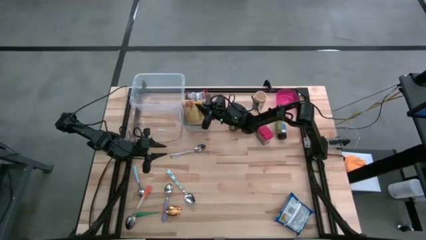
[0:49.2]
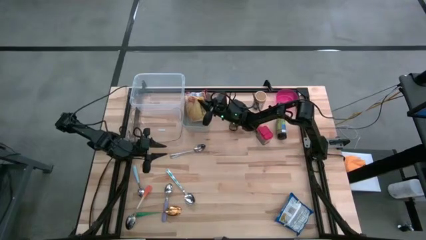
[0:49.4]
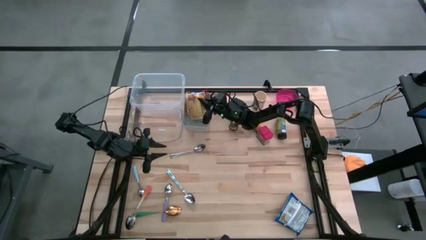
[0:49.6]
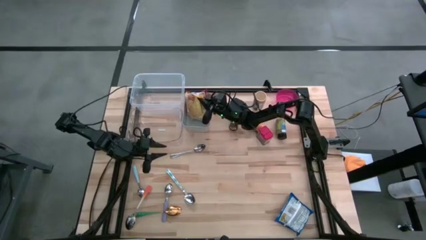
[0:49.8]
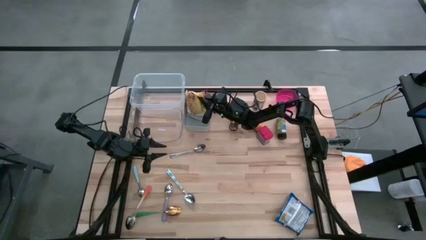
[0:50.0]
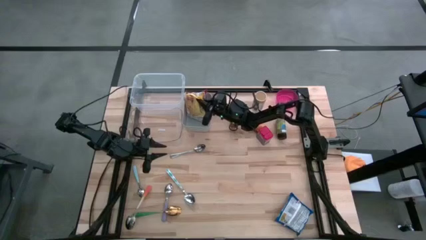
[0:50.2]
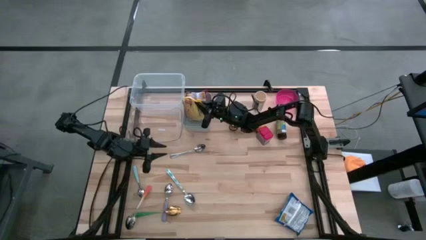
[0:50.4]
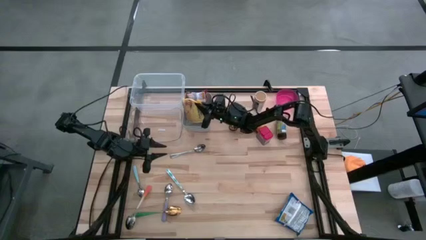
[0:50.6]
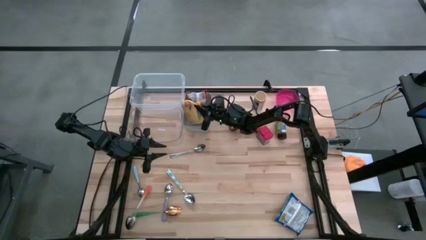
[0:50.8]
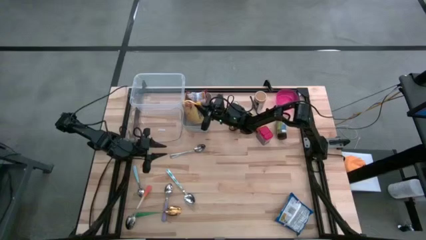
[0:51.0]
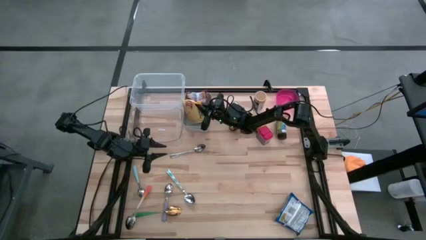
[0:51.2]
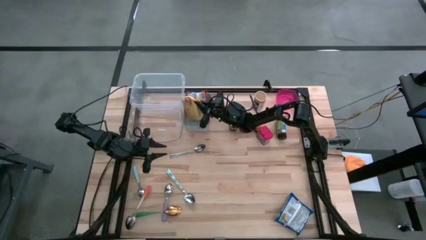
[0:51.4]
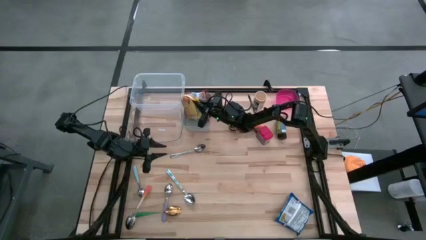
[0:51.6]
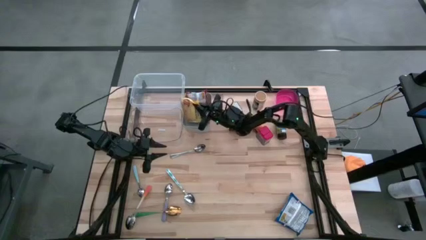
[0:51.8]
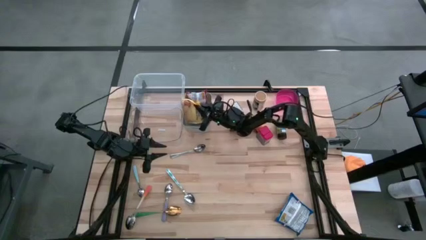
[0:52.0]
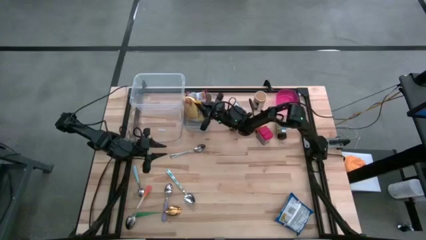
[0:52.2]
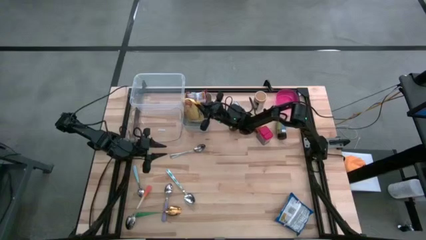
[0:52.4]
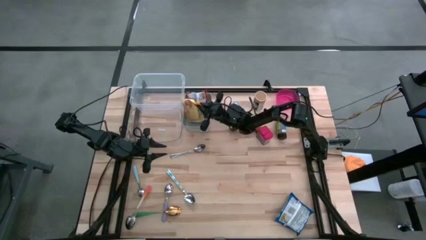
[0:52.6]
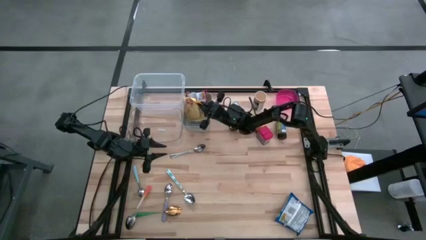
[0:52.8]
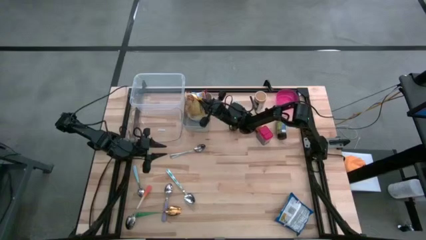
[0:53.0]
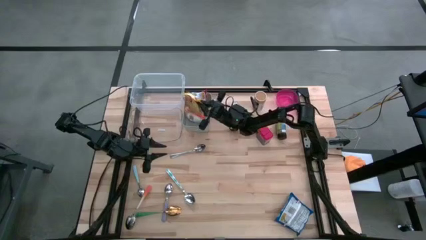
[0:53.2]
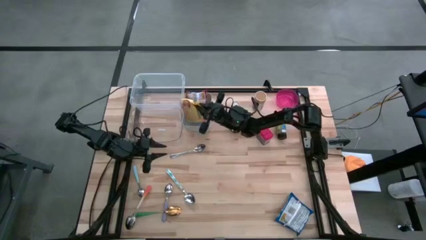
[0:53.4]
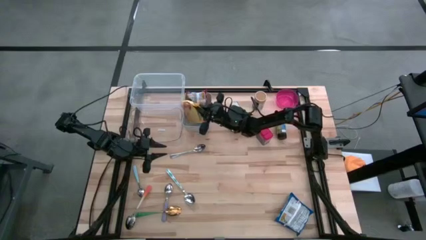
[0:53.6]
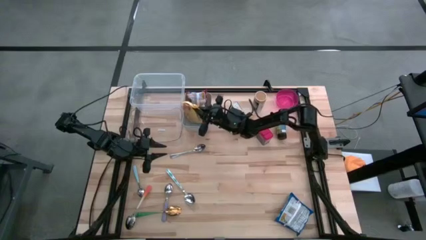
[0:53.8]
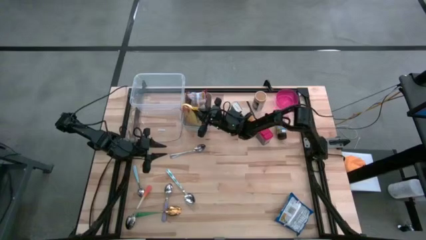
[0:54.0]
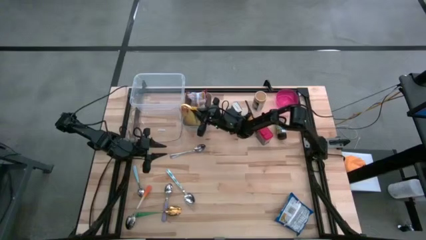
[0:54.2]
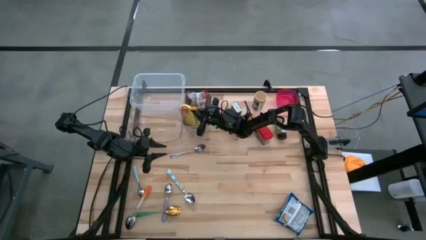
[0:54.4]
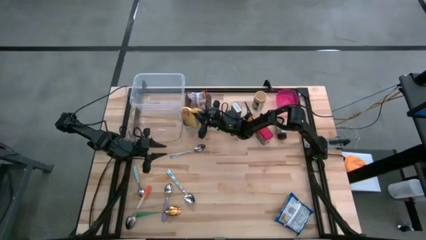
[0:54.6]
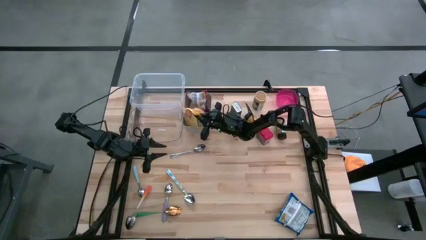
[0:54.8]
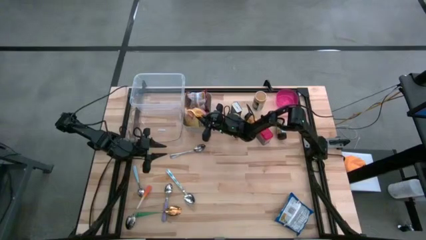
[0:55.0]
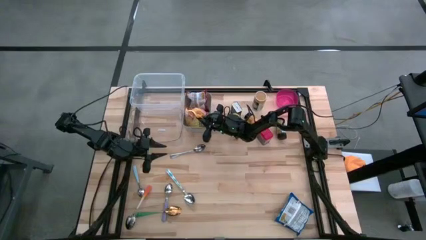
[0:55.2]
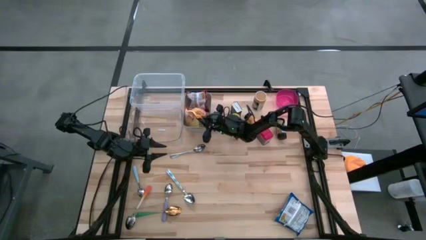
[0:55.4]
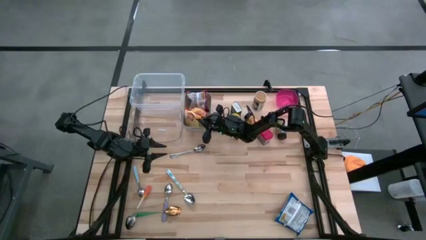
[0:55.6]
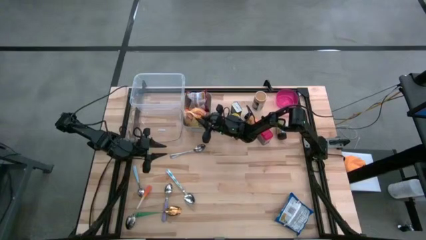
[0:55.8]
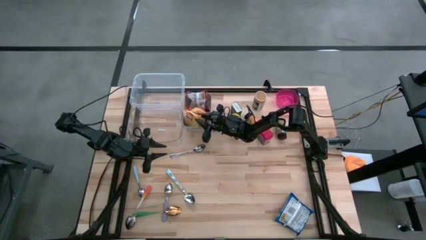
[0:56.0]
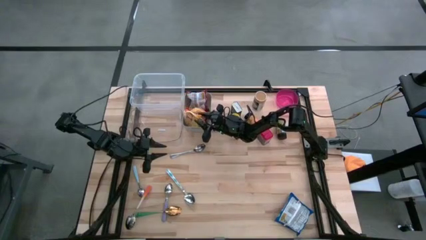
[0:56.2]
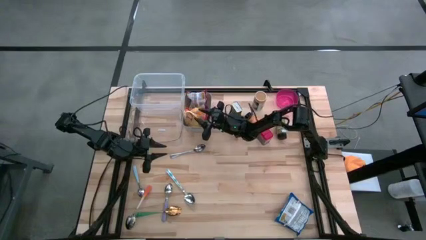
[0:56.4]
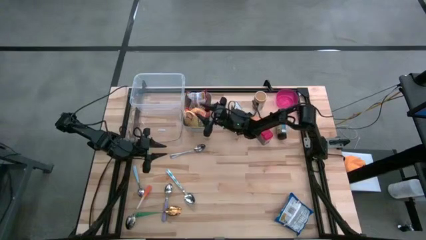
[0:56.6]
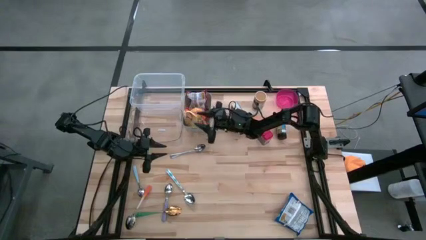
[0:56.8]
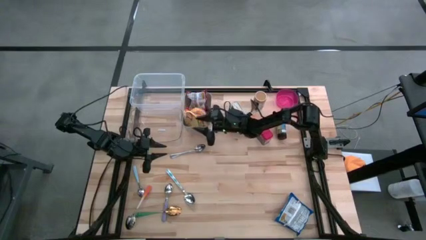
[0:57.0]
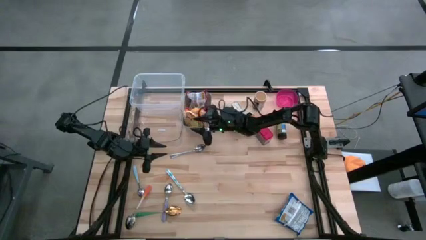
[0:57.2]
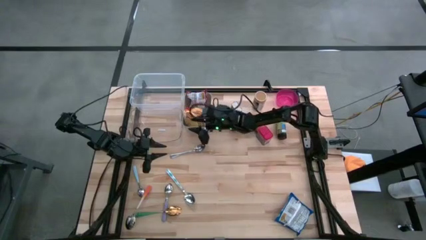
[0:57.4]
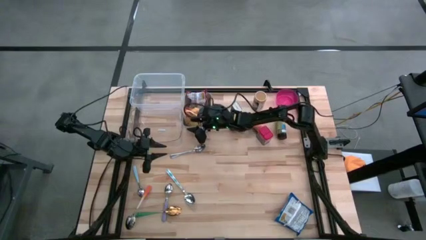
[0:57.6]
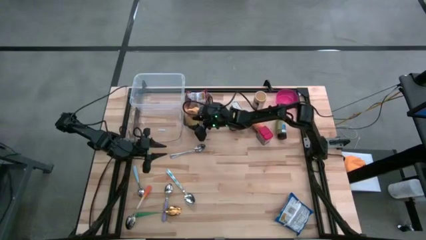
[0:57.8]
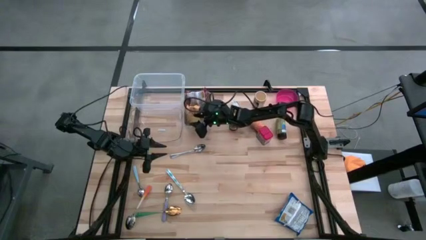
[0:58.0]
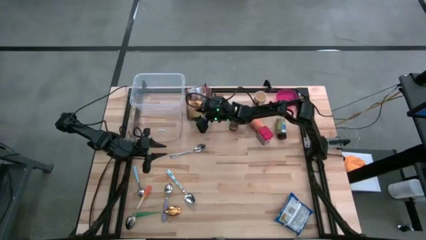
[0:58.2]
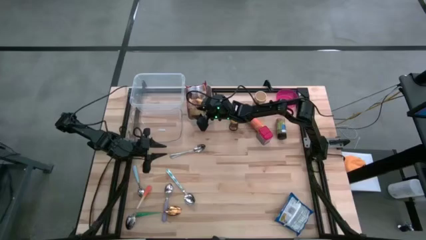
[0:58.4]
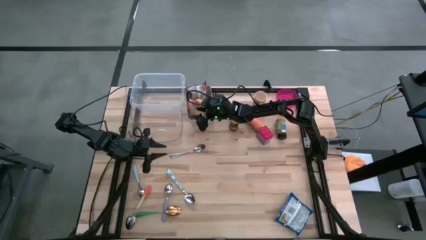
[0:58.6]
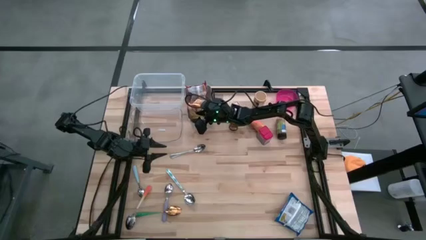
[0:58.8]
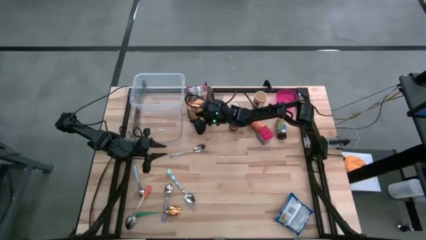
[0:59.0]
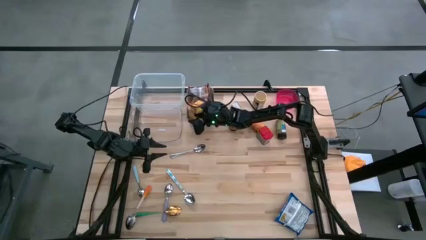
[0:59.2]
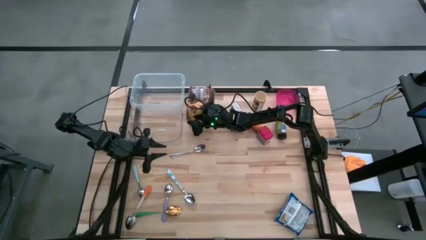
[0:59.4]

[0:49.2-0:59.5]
Put the yellow noodle pack into the gray bin

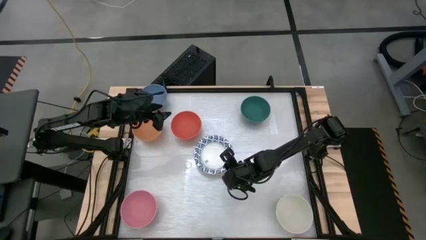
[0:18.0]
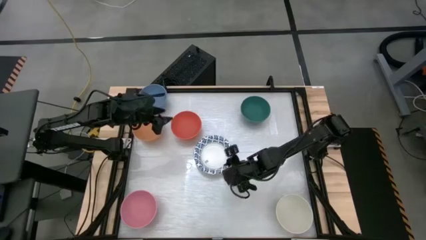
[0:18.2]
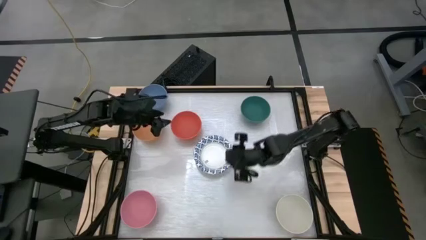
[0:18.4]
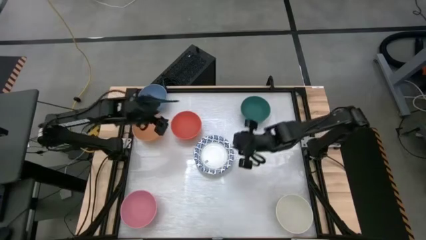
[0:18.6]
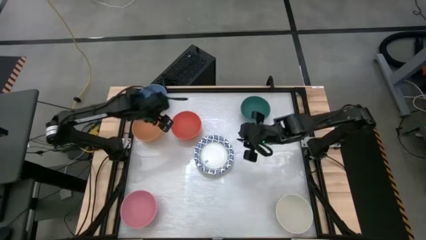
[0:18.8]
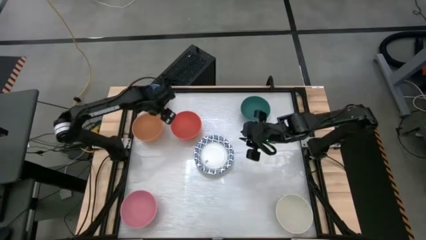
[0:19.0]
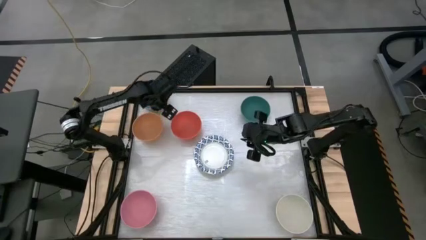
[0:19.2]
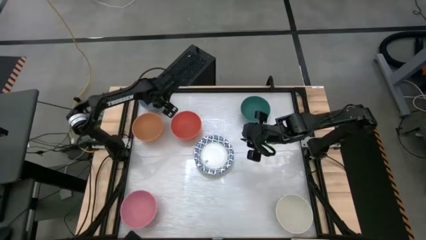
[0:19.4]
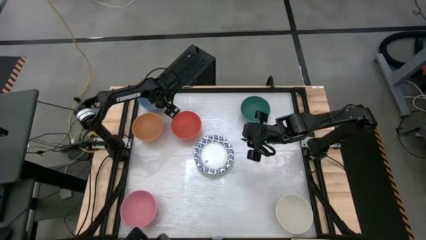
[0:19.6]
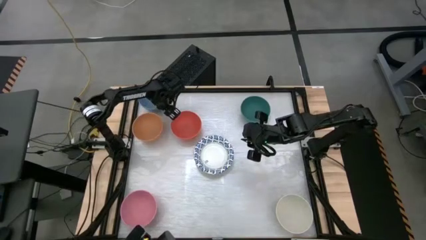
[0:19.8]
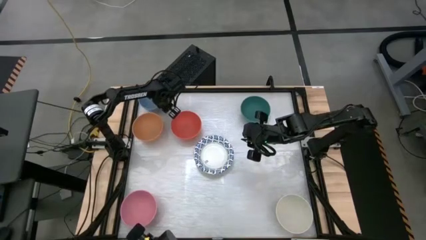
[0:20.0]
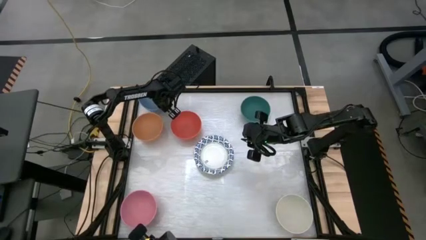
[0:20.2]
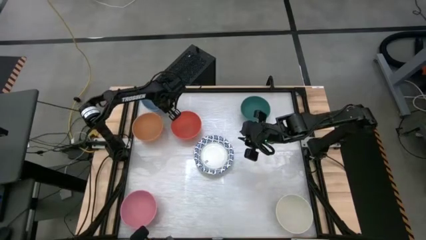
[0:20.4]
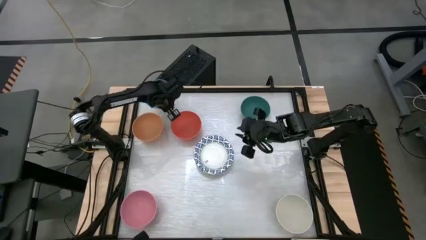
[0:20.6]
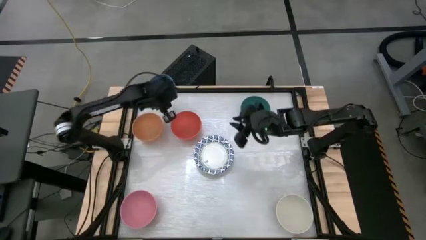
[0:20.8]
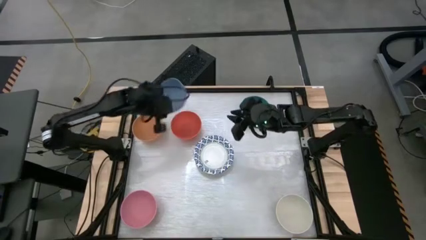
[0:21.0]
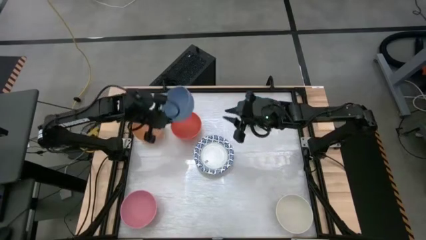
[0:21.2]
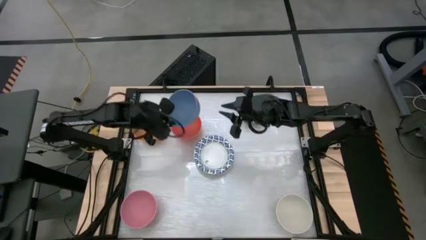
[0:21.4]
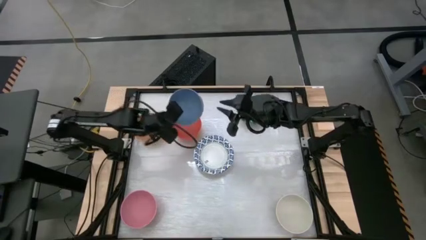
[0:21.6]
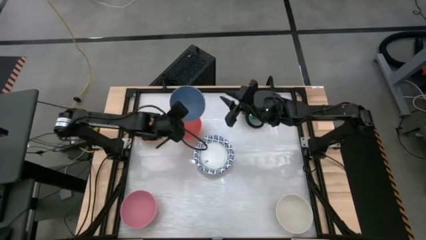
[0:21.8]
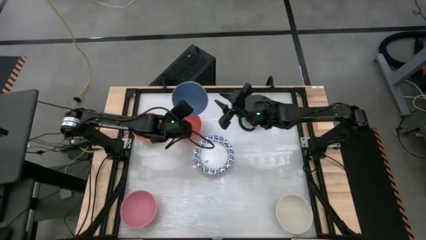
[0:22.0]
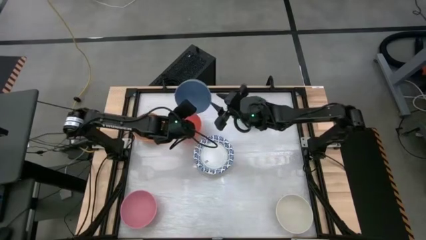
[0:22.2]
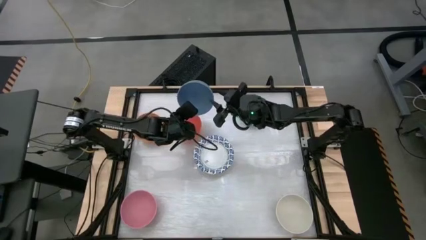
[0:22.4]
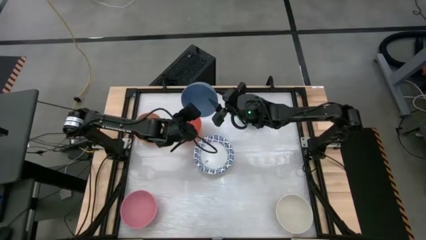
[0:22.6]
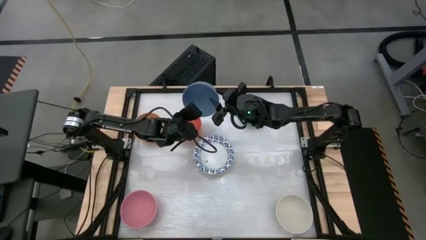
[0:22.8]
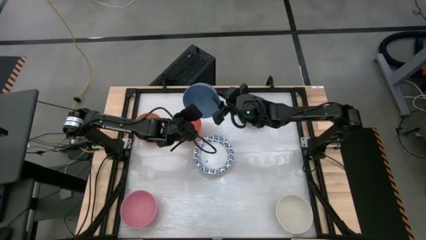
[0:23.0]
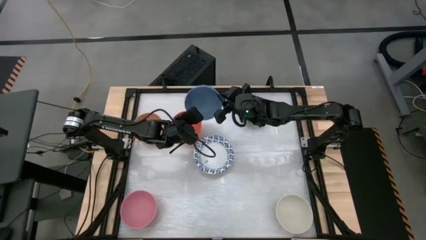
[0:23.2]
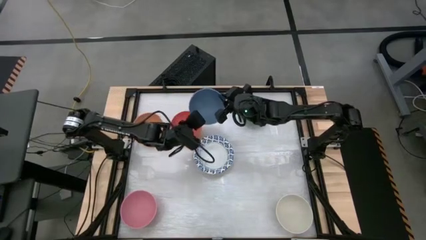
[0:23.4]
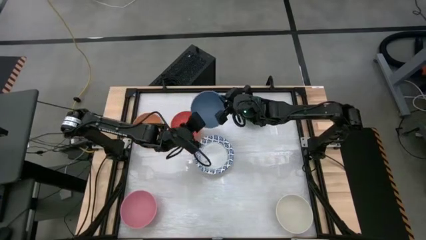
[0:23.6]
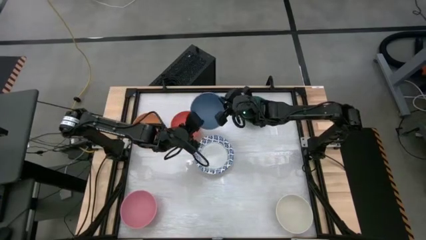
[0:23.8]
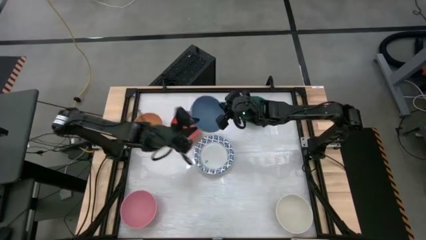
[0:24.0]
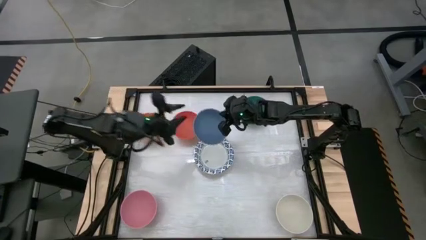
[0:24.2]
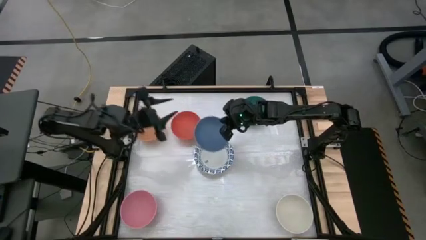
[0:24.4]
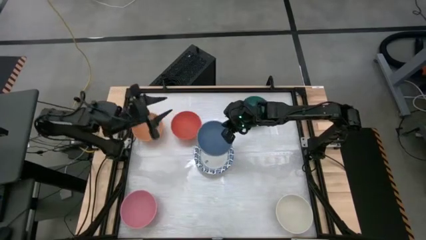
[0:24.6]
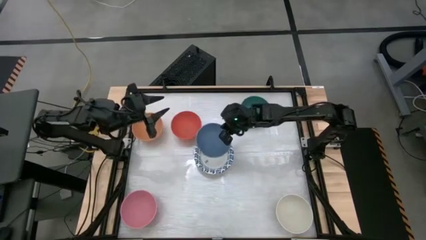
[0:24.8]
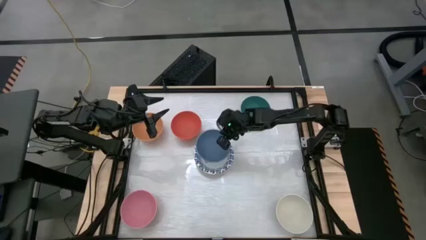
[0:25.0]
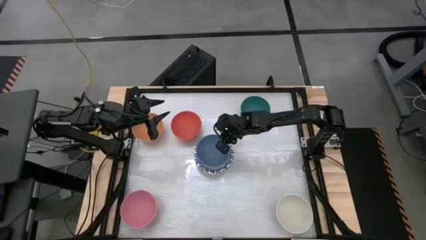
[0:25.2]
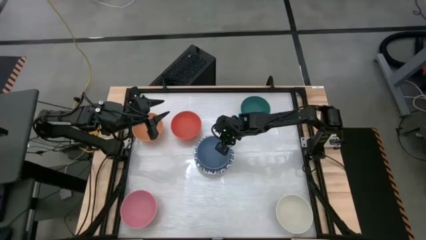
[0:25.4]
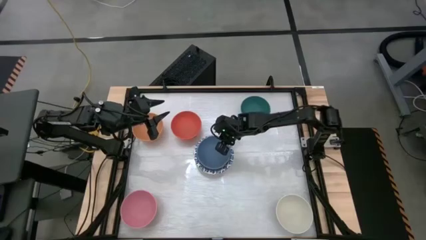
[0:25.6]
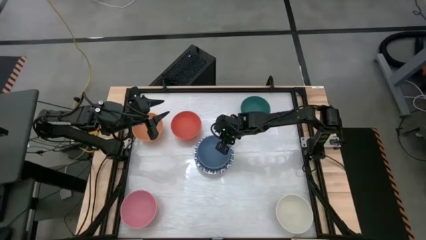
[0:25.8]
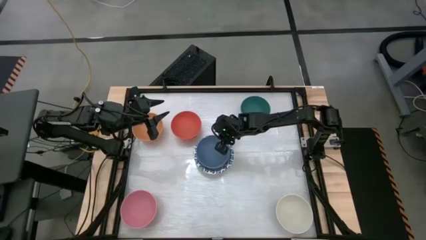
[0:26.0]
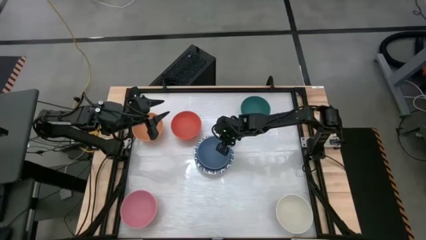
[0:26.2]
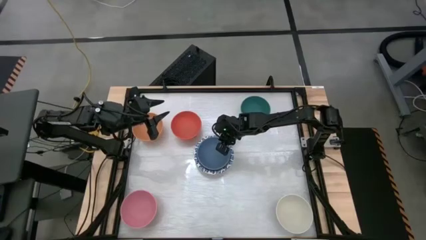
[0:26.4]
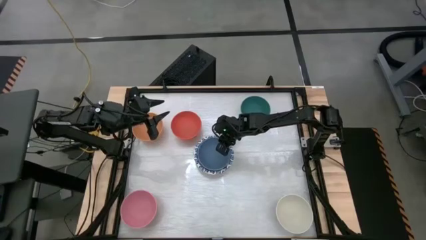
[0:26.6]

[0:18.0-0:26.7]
Stack the blue bowl on top of the white and blue plate
